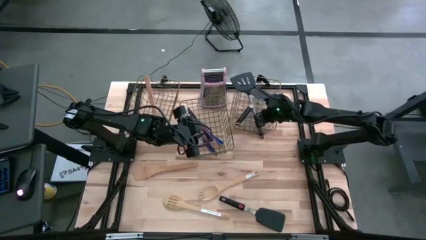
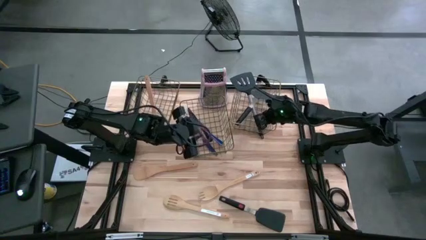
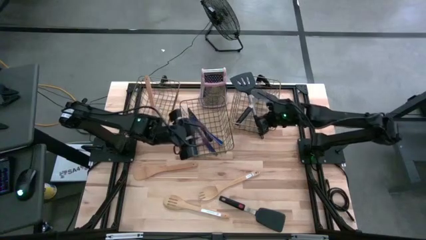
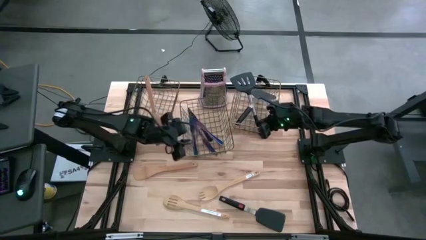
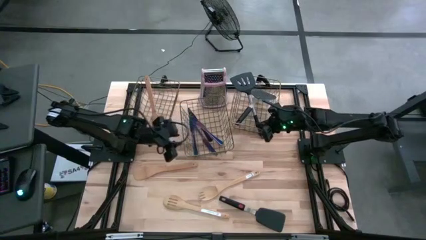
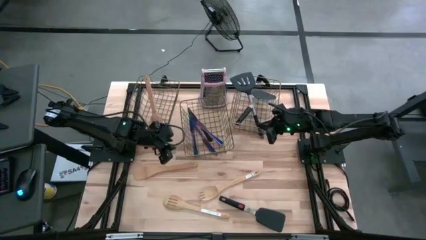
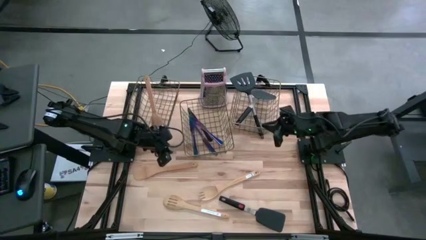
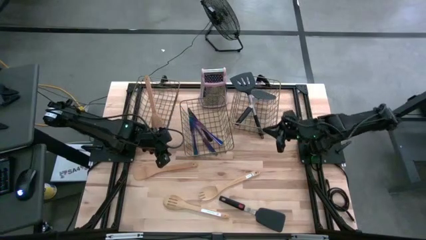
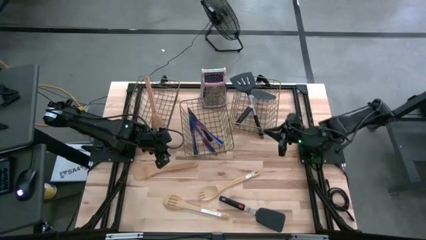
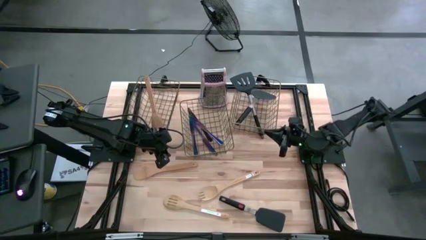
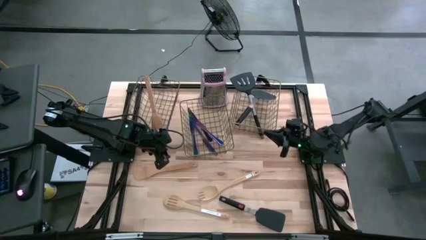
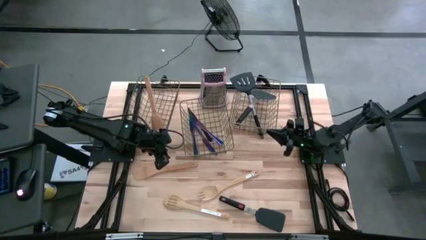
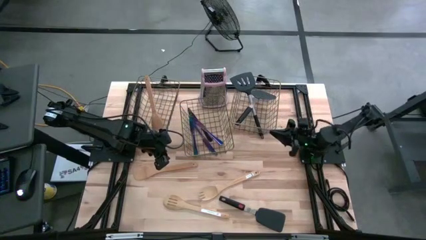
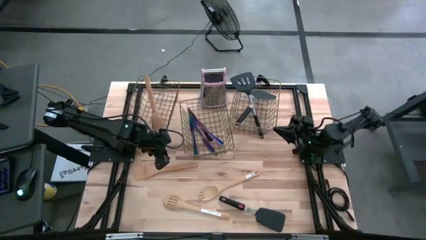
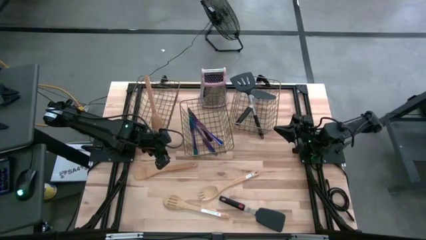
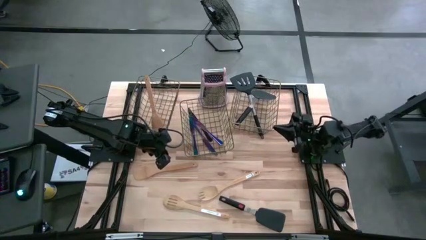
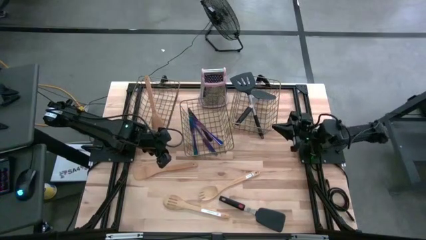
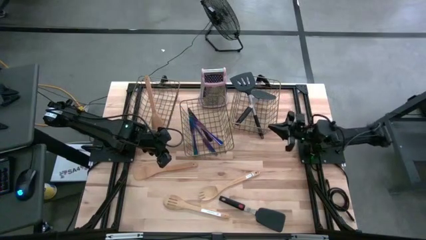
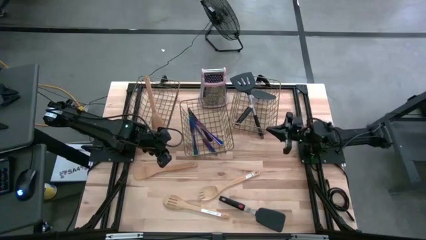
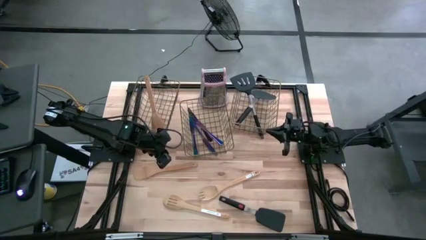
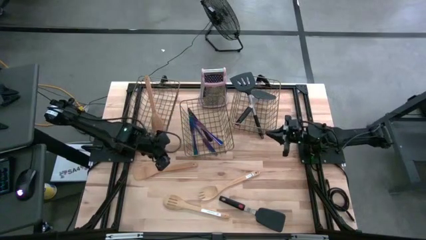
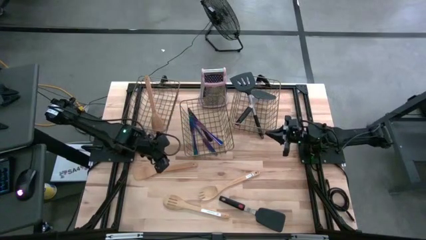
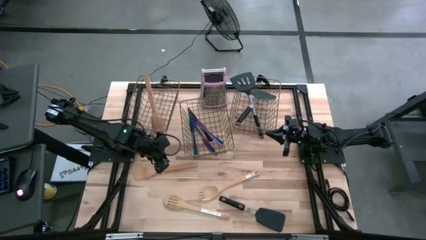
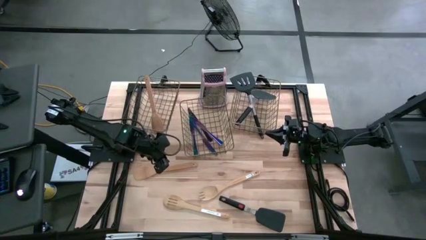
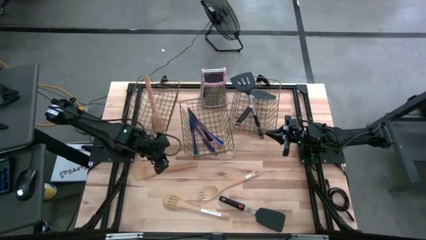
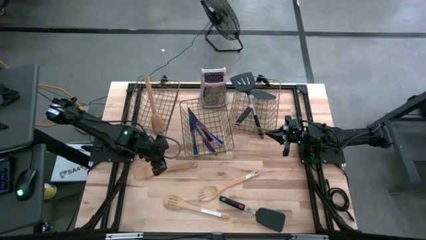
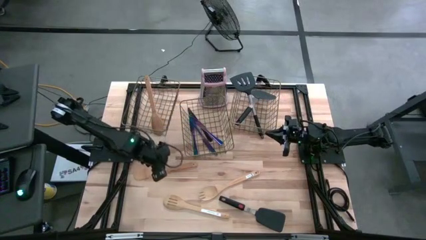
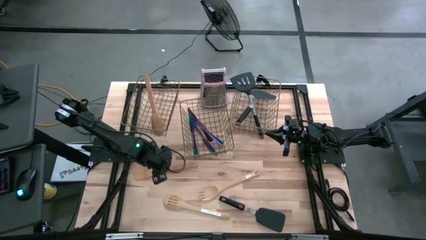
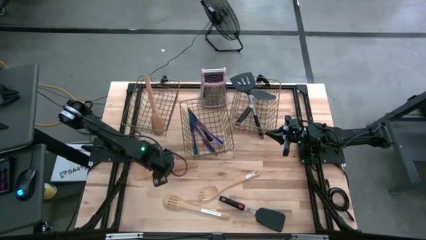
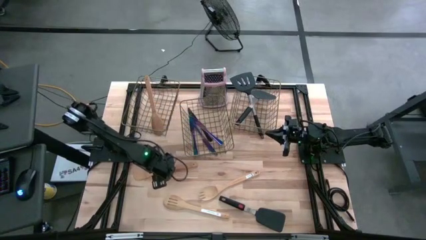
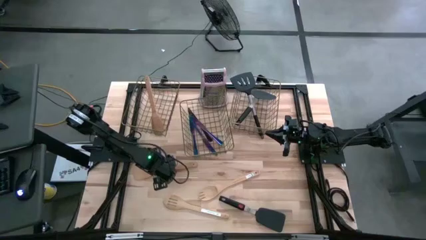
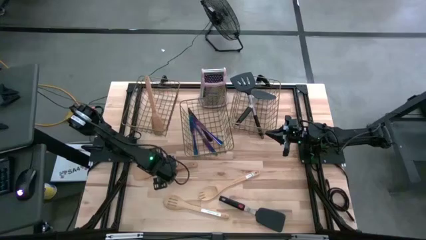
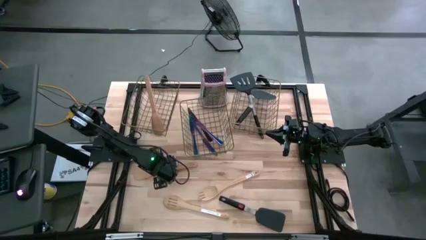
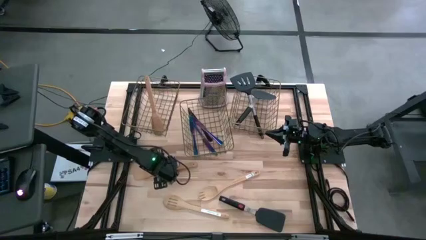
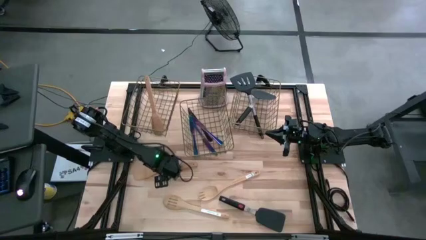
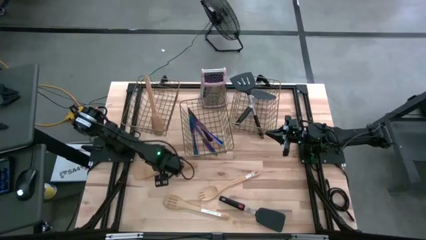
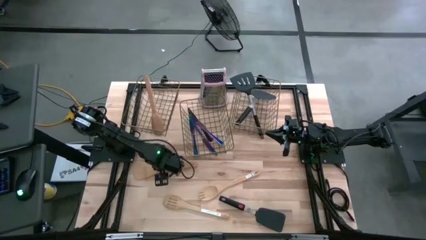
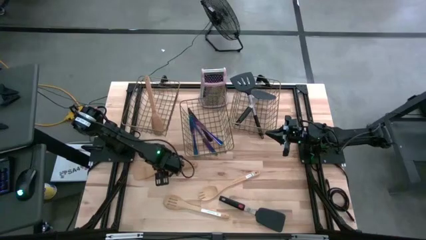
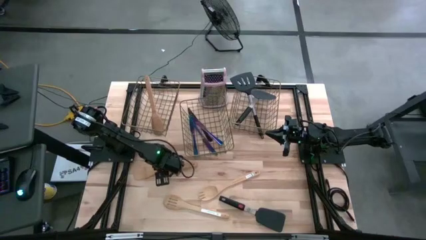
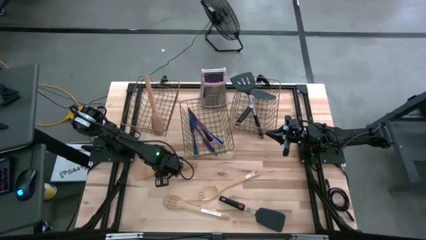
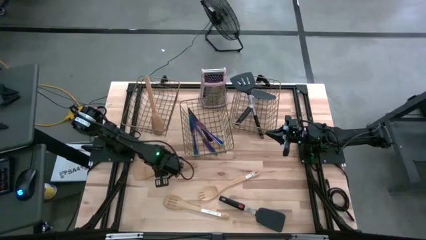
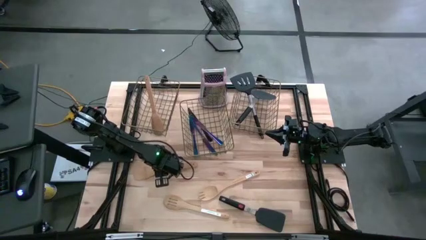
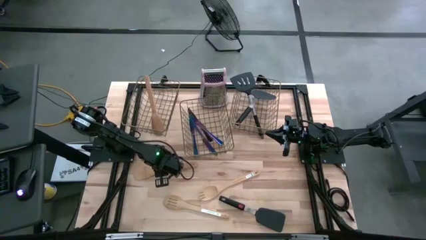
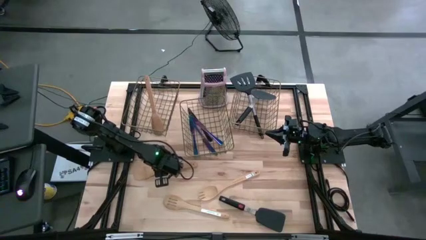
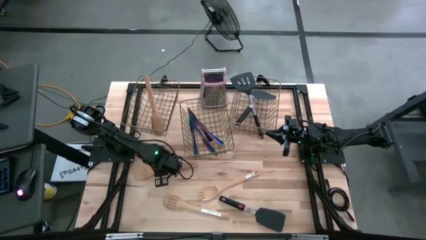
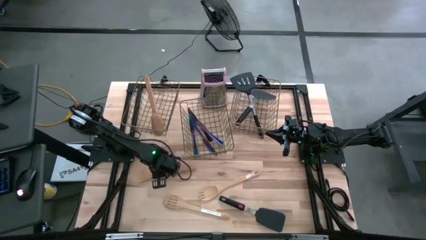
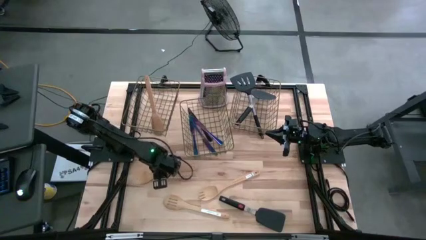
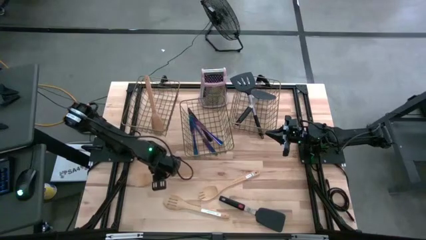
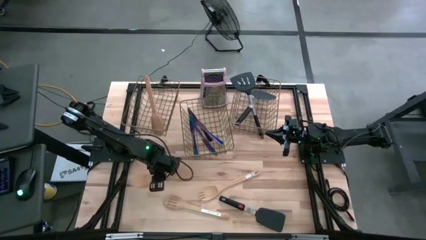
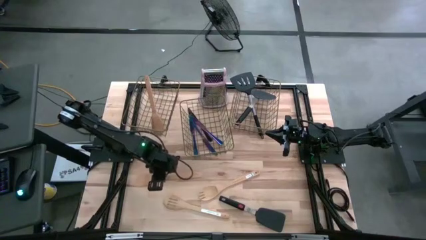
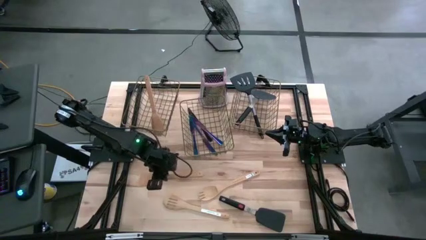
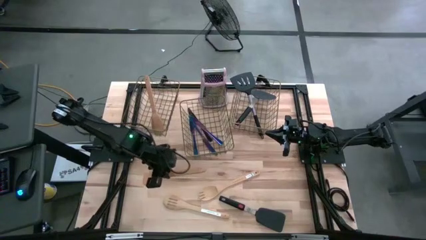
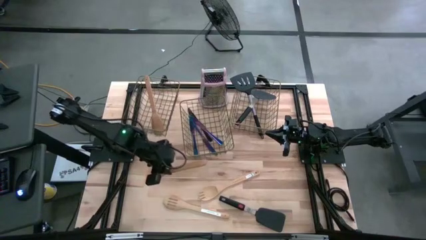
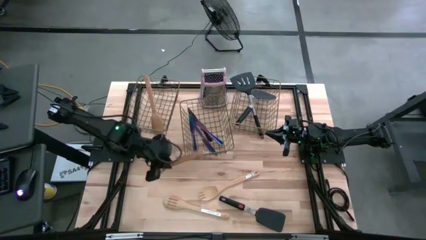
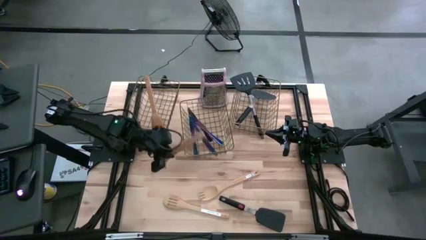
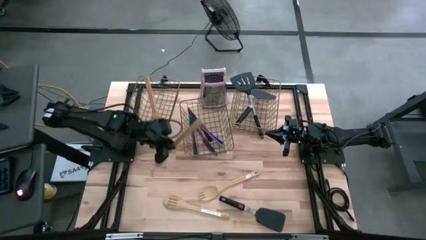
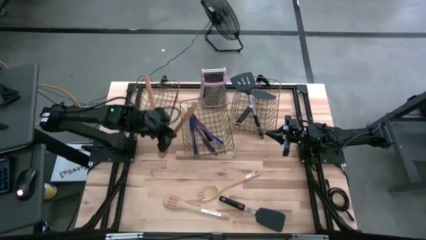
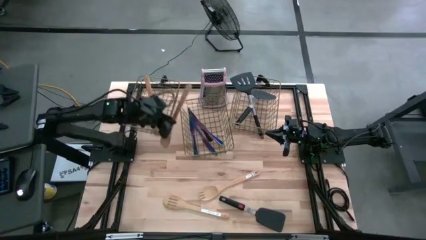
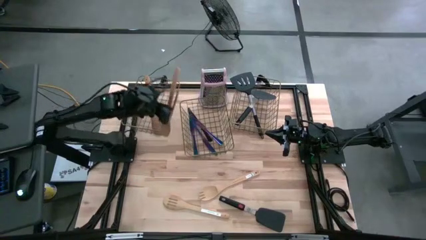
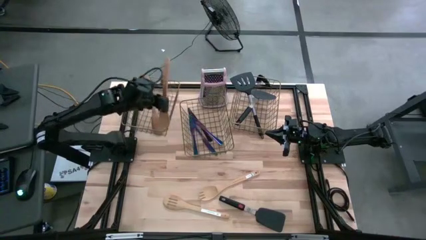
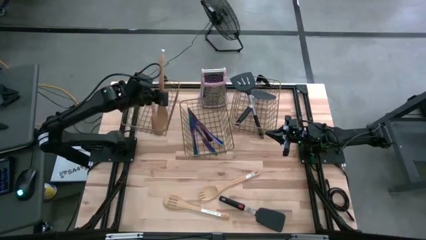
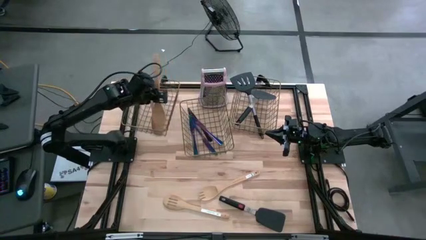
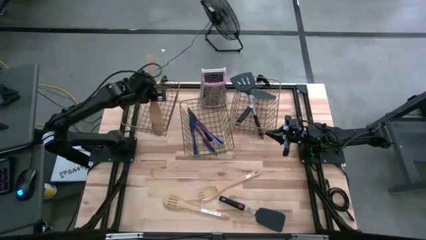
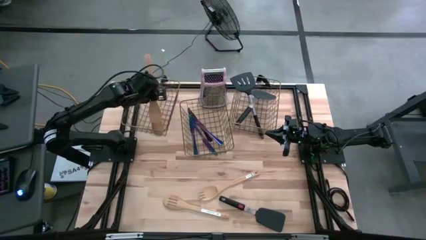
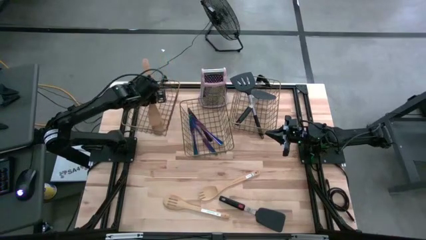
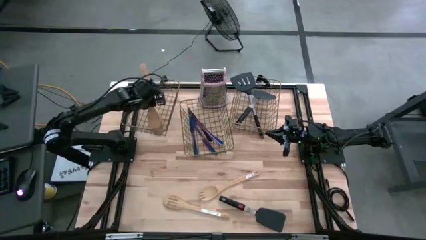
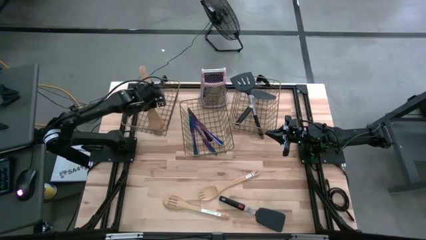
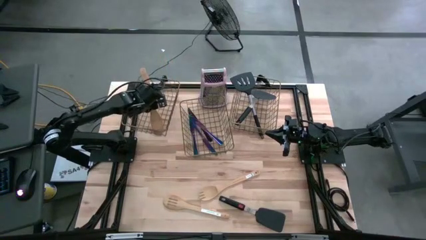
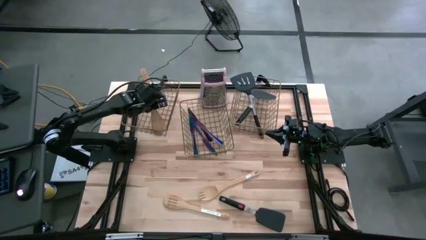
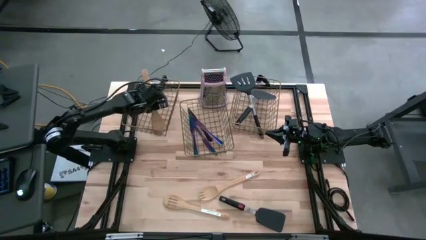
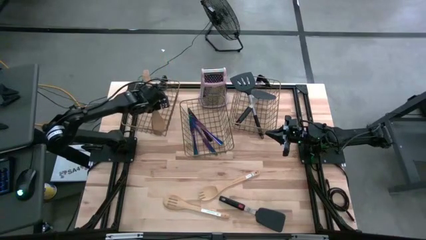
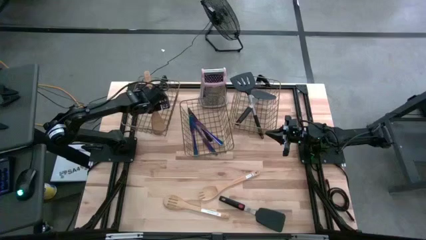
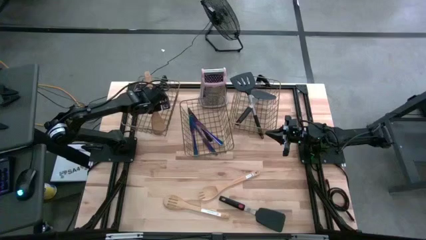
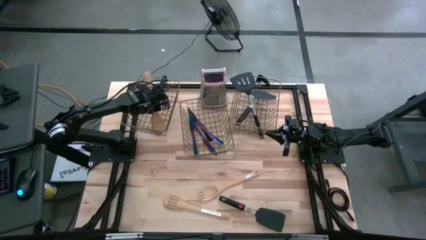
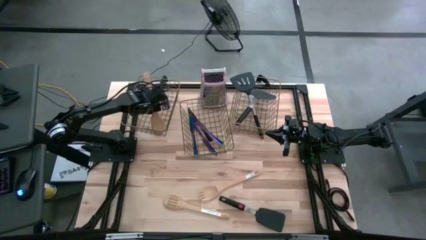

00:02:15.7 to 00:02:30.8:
Task: Pick & Place Kitchen Items
Put the top brown serving spoon into the left wire basket

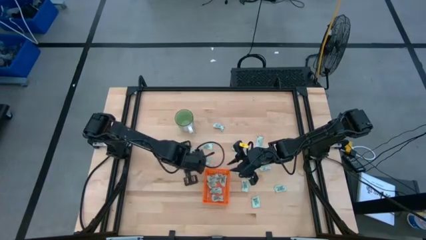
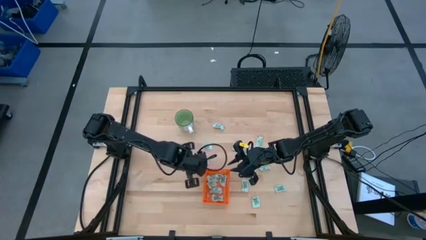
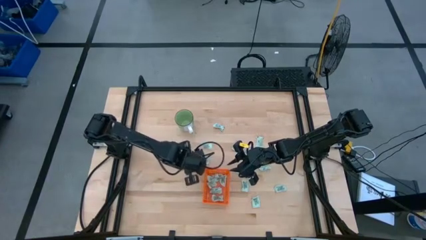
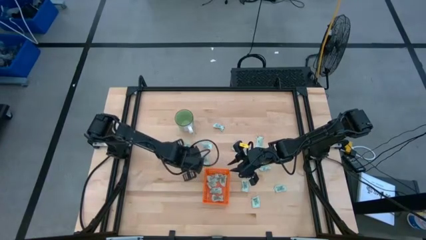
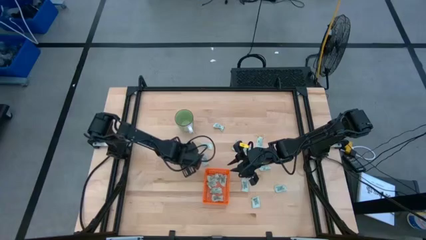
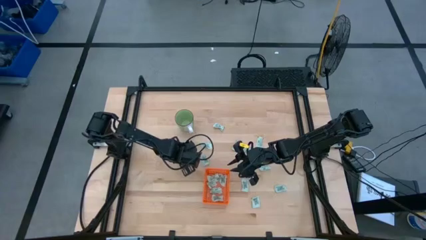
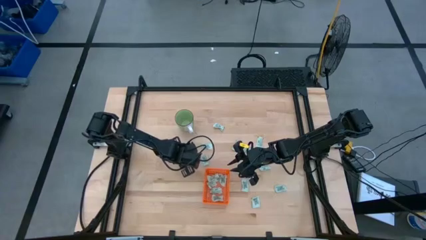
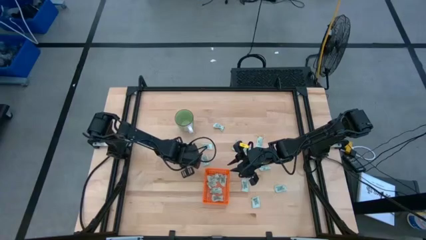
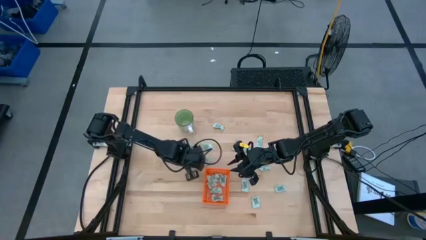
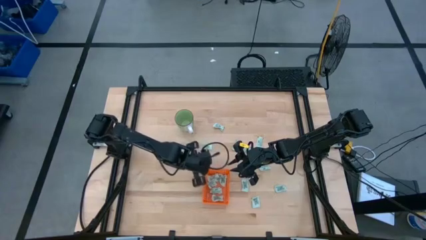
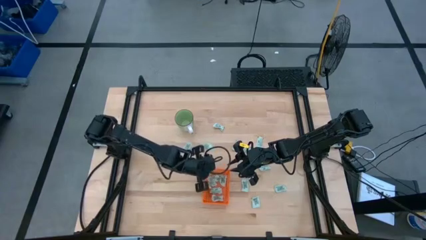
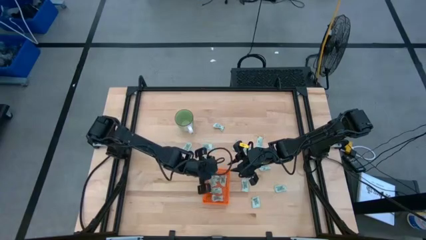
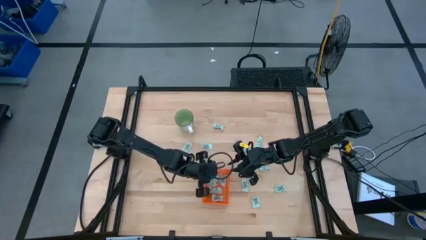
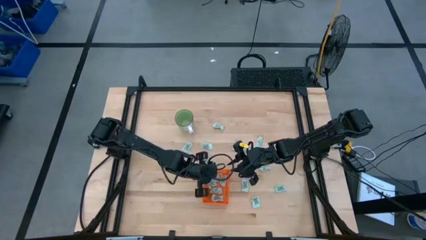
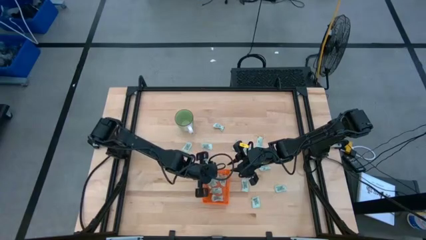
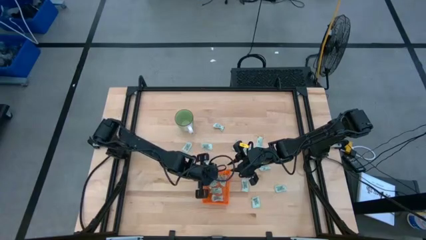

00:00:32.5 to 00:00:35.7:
Task: Pick and place Stevia / Truvia into bins
Put the stevia packet into the orange basket
